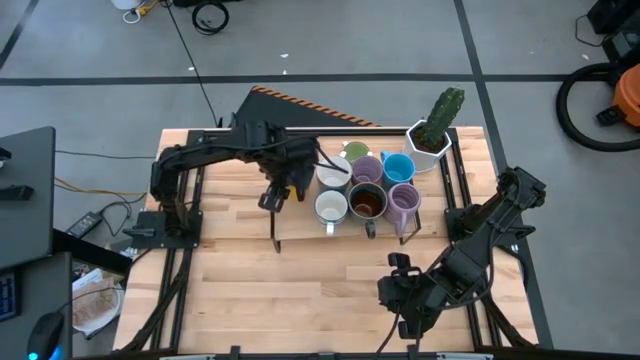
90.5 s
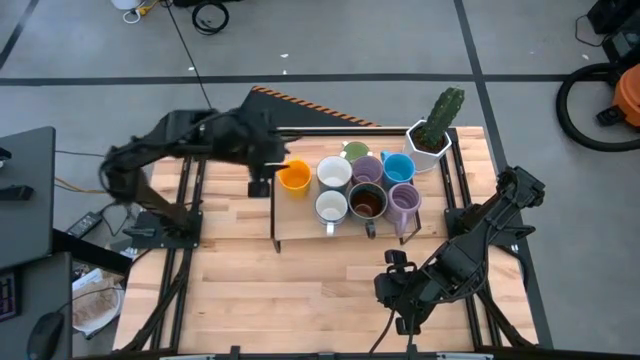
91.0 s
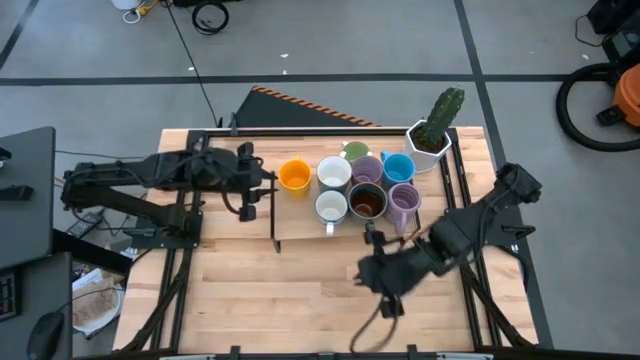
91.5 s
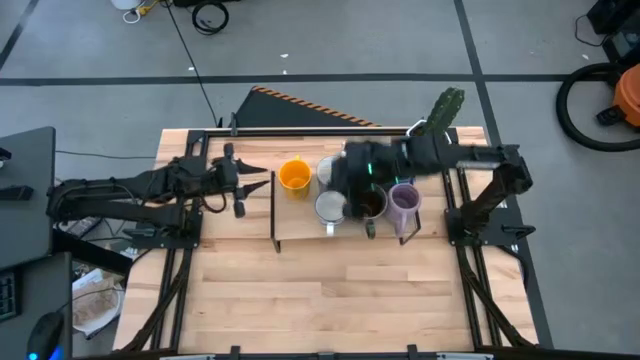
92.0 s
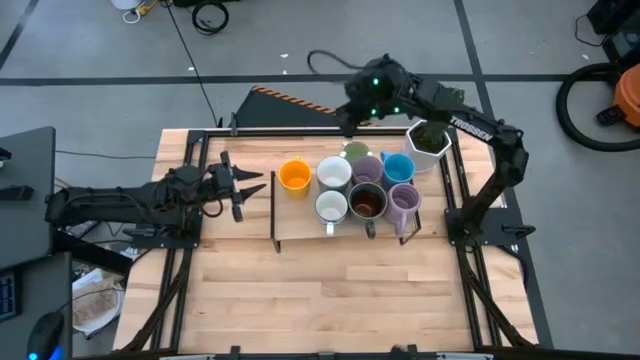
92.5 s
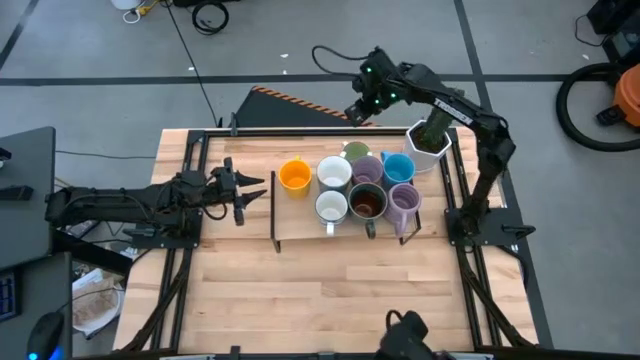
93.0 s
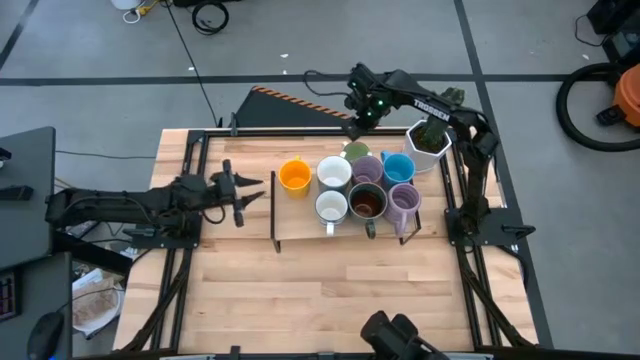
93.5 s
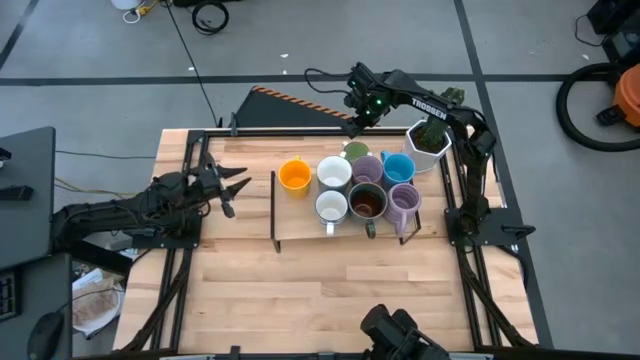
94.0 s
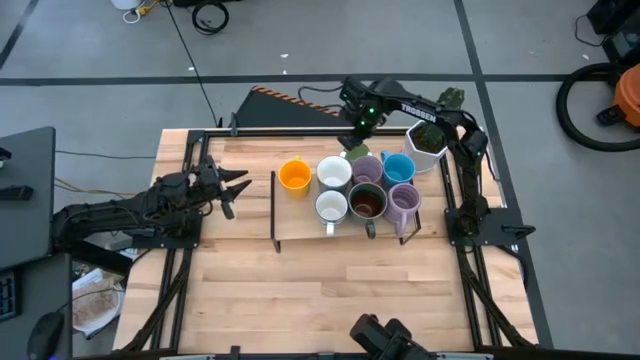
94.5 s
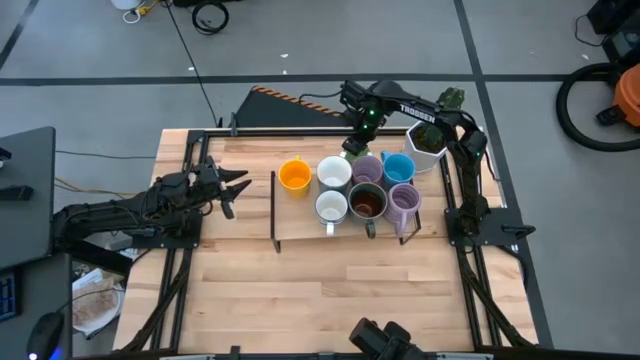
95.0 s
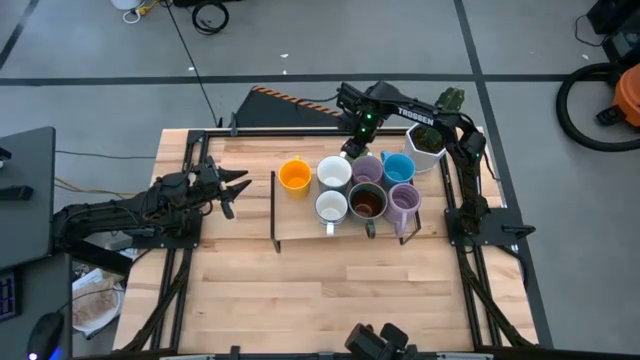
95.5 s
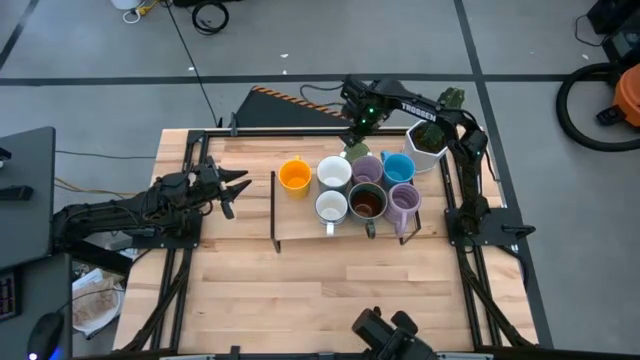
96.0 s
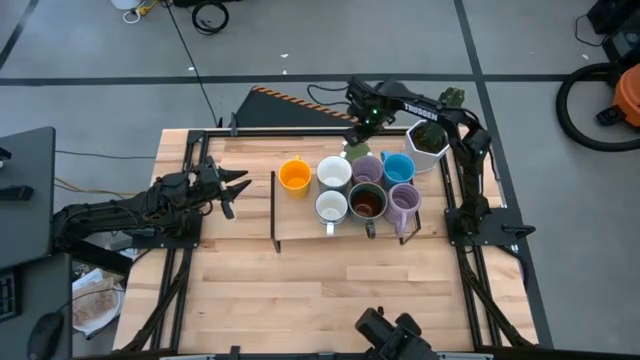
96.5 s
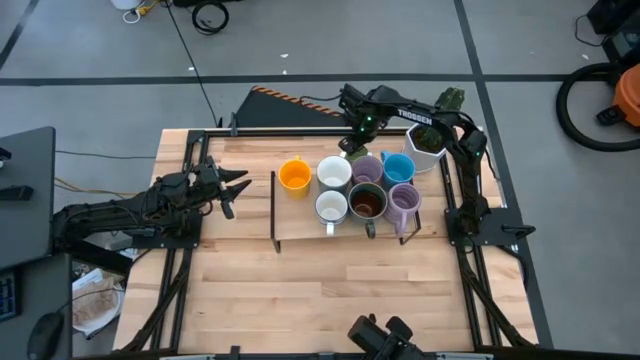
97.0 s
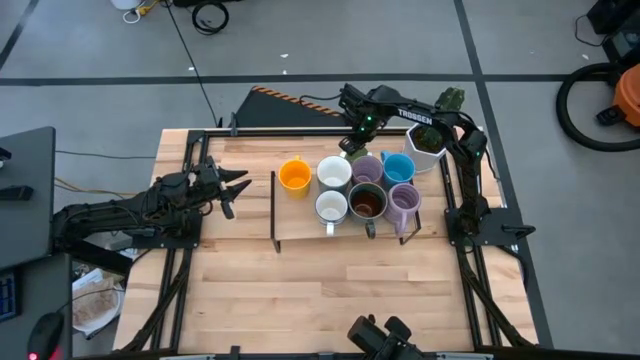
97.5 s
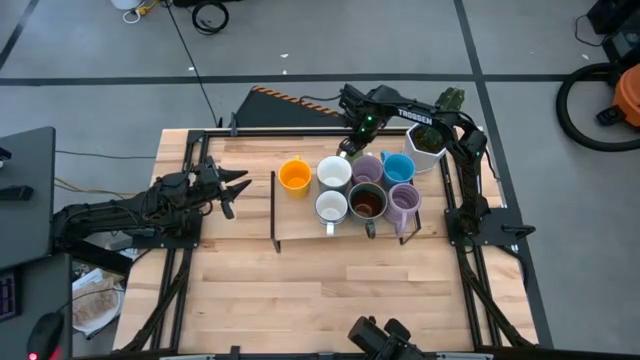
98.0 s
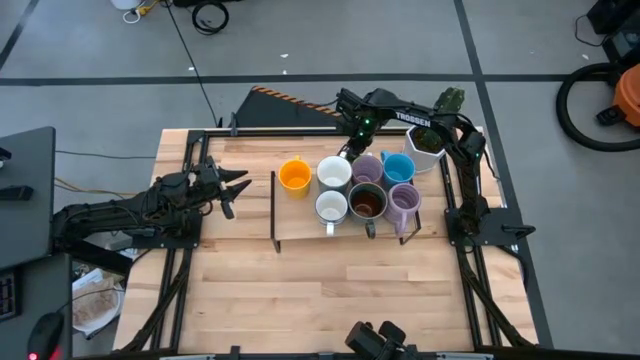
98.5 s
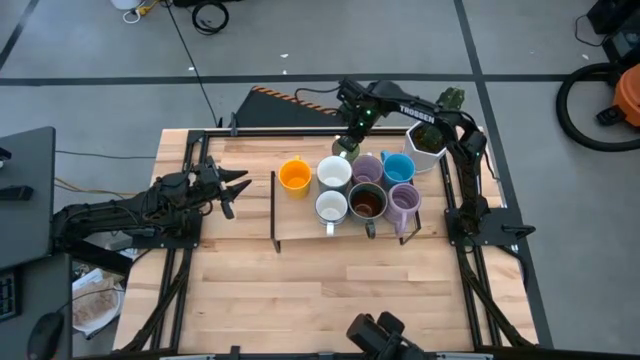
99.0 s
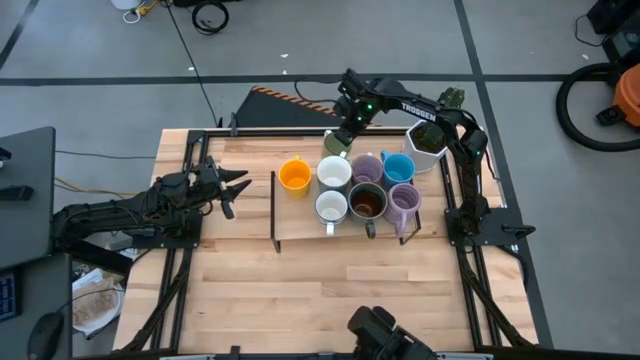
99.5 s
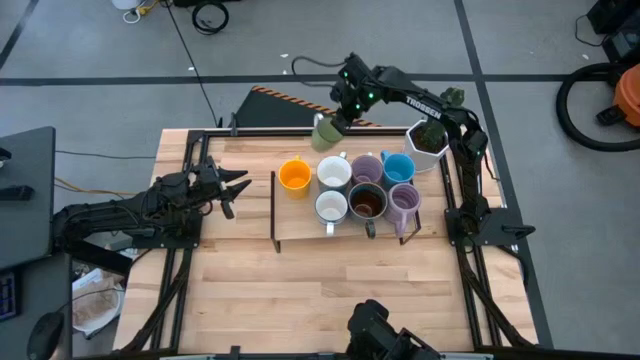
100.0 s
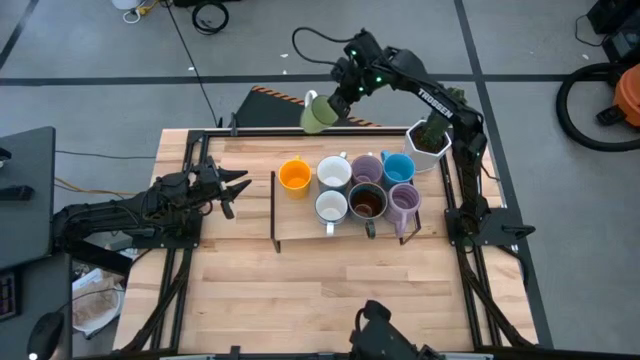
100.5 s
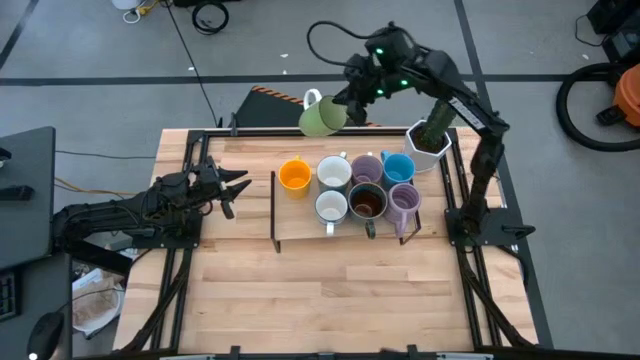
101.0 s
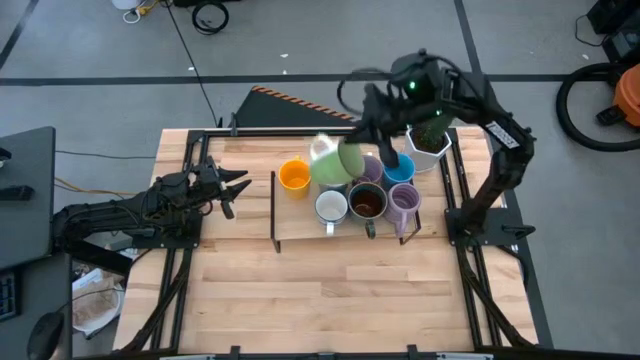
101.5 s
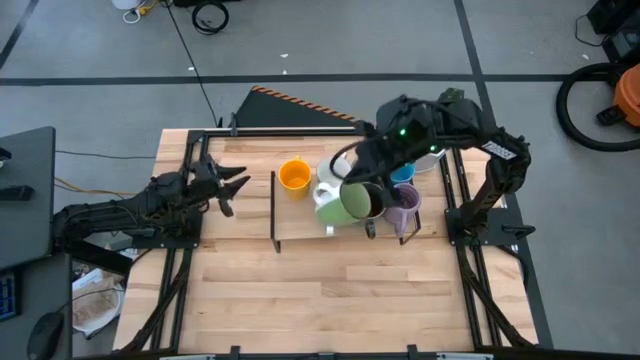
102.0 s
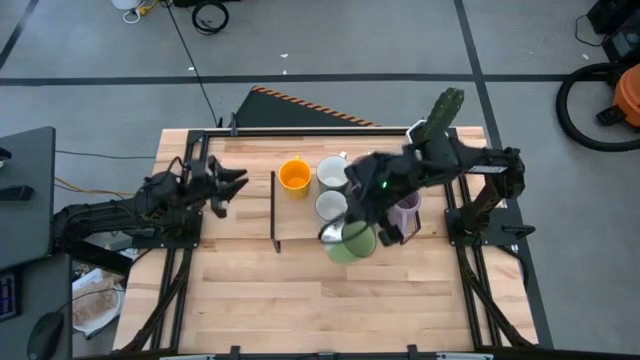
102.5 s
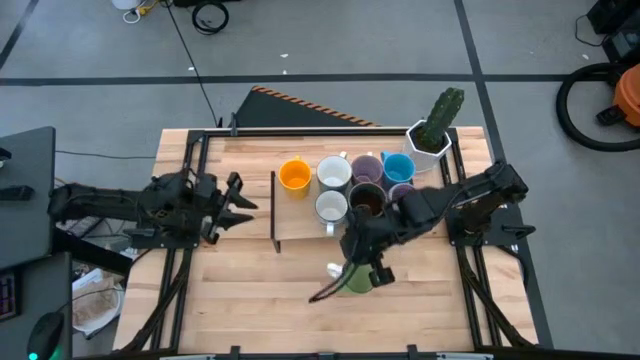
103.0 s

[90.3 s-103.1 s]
Task: Place coffee mugs
Put the green mug on the shelf

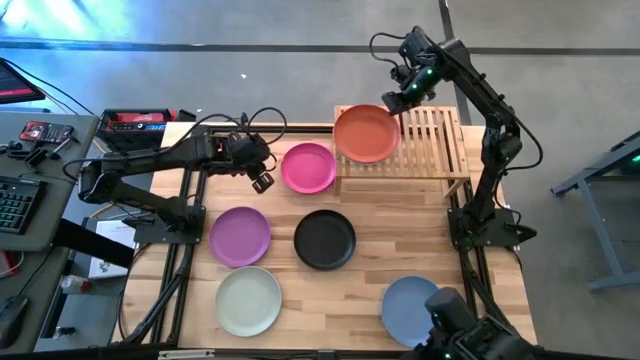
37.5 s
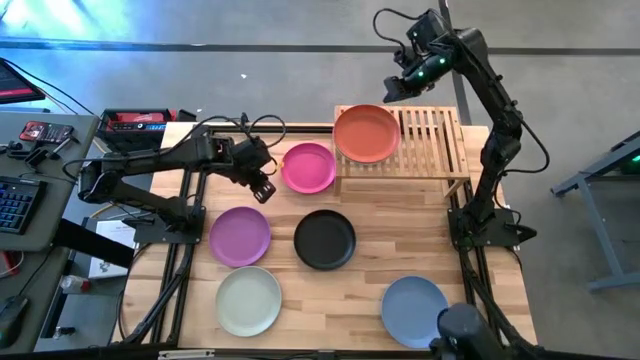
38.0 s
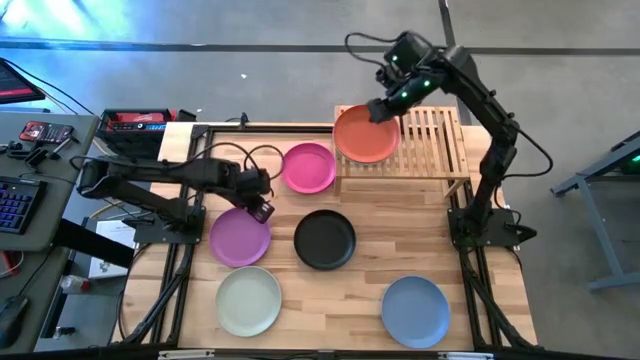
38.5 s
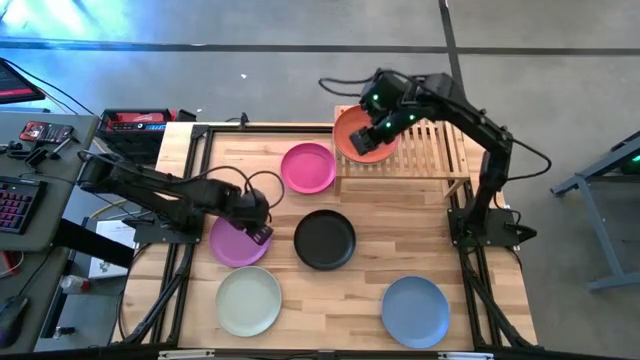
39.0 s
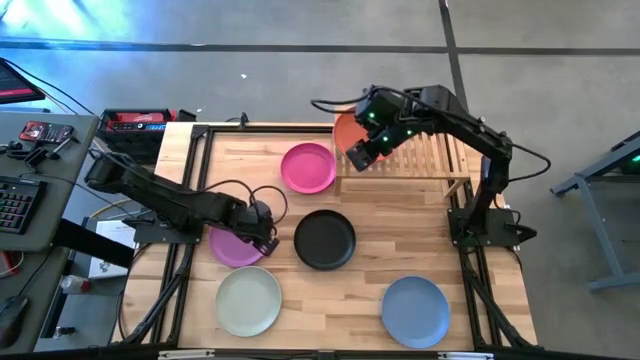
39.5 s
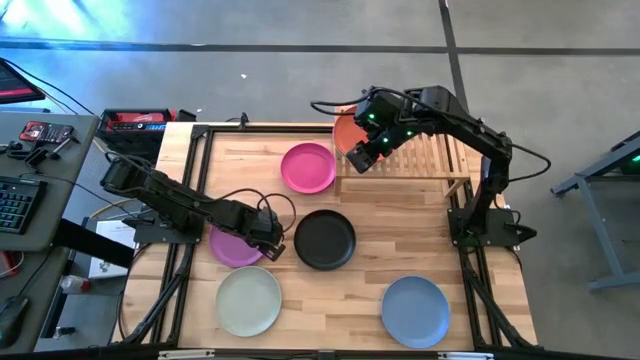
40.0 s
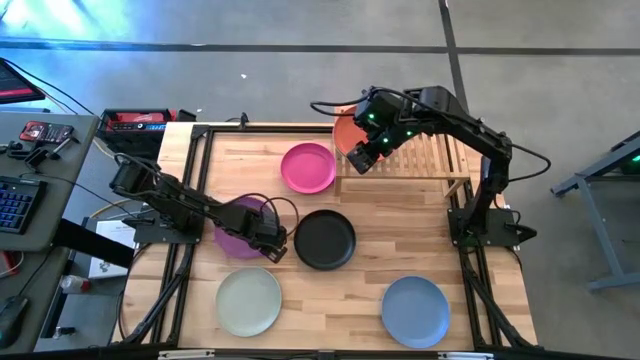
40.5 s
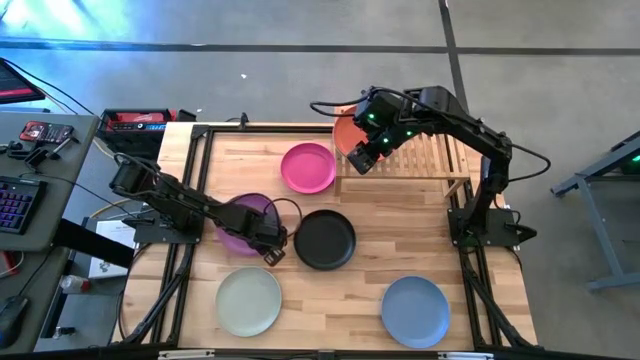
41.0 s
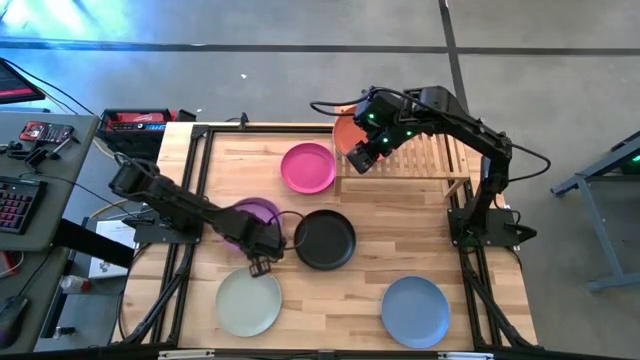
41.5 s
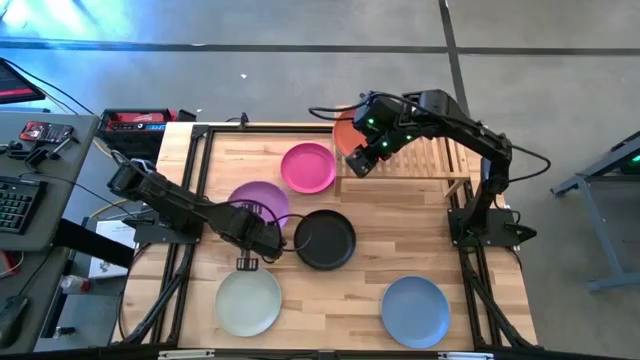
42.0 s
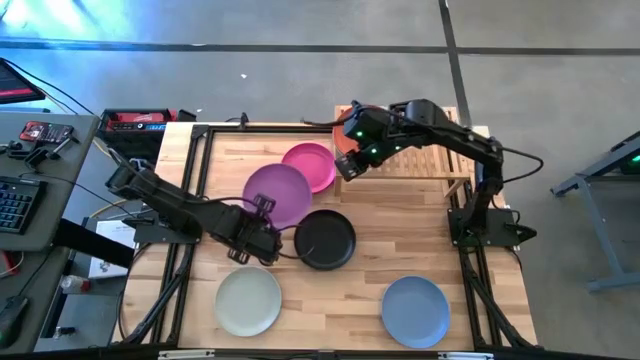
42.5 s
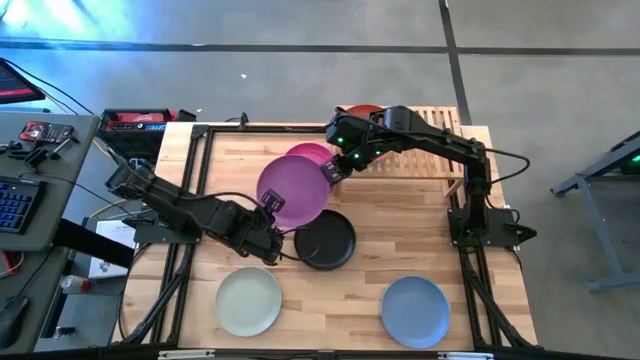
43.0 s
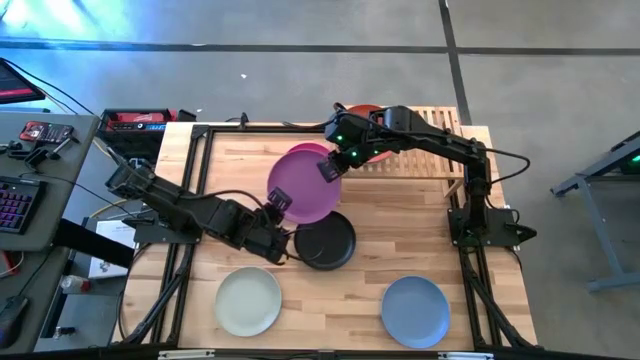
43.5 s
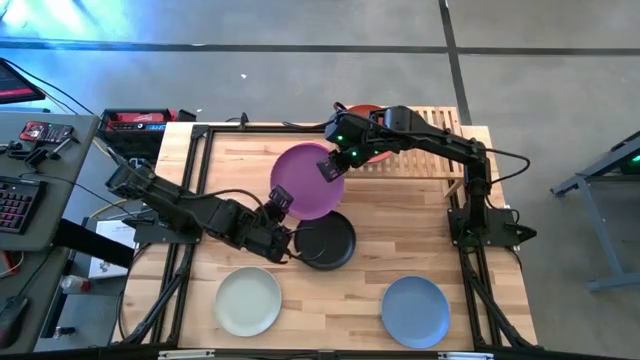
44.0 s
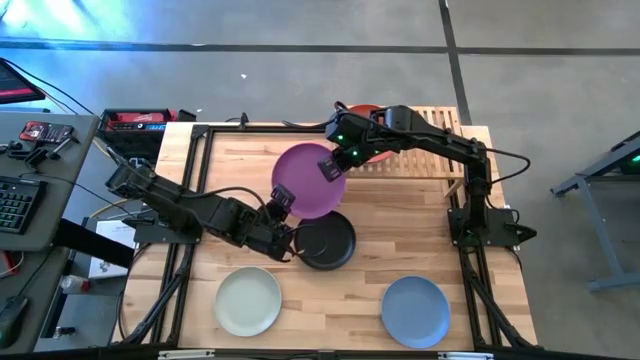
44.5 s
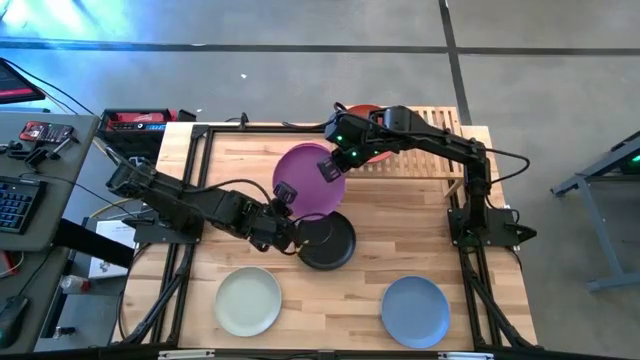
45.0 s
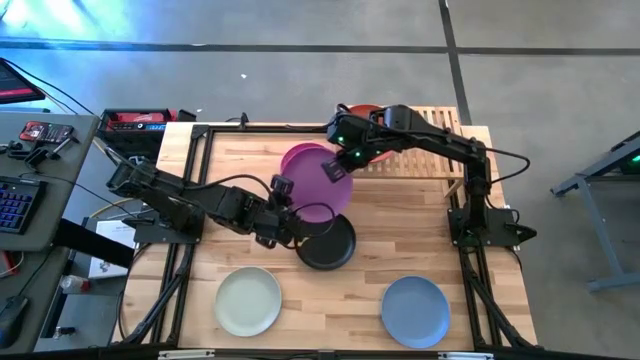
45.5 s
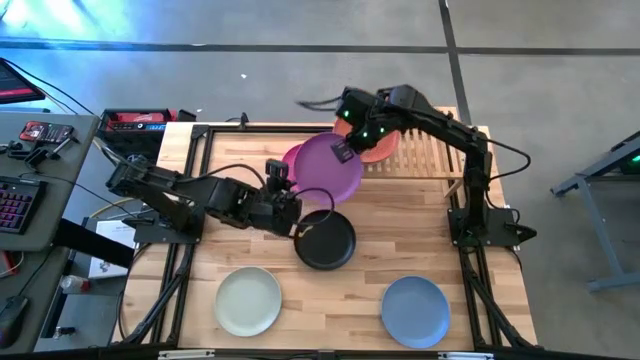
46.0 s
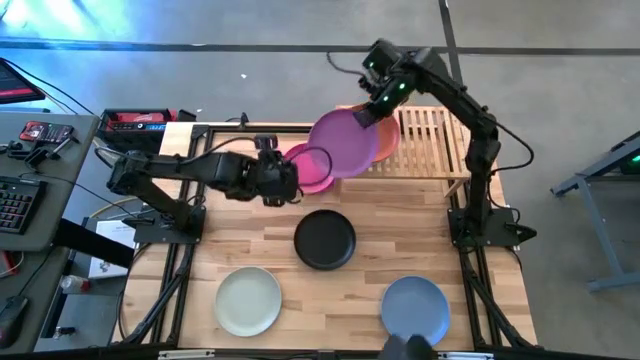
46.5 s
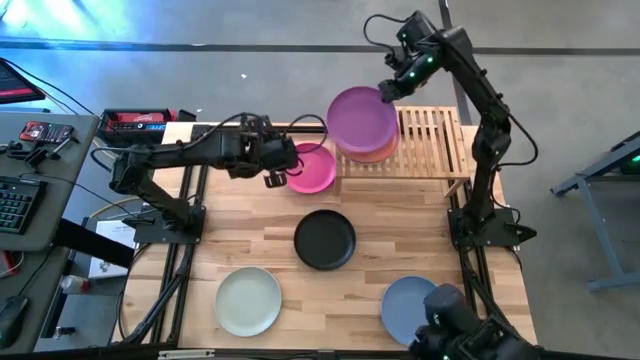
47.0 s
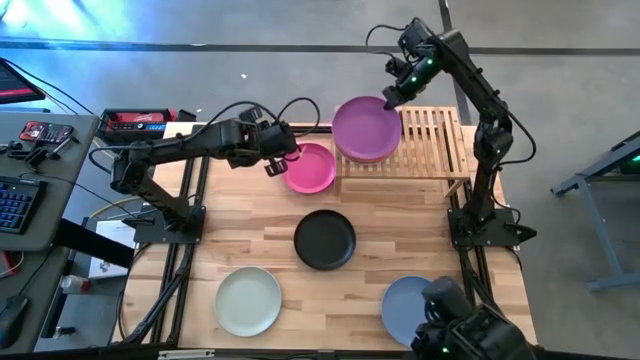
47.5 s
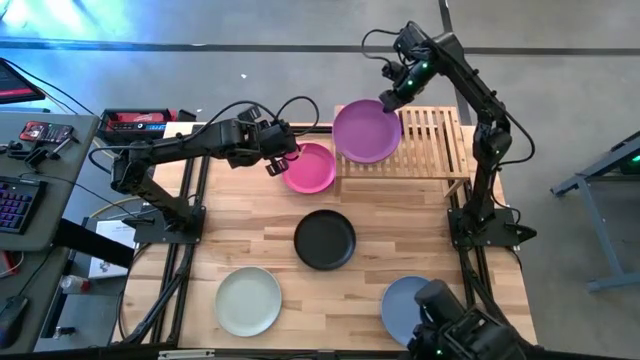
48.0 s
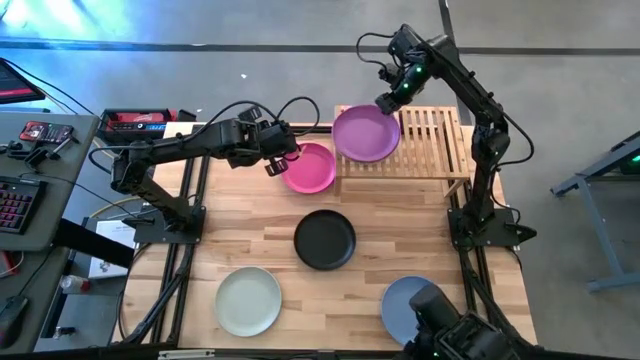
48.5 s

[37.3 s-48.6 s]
Task: Place and stack plates onto a shelf
Stack the middle left violet plate on the orange plate
